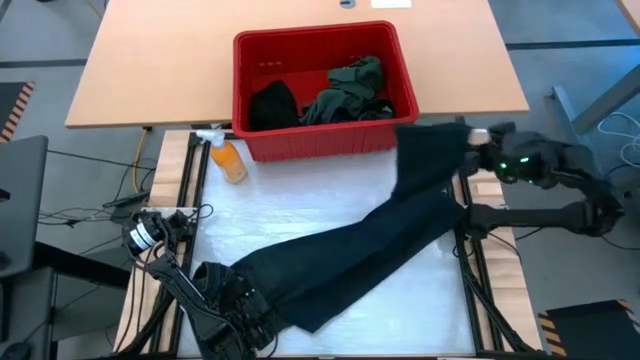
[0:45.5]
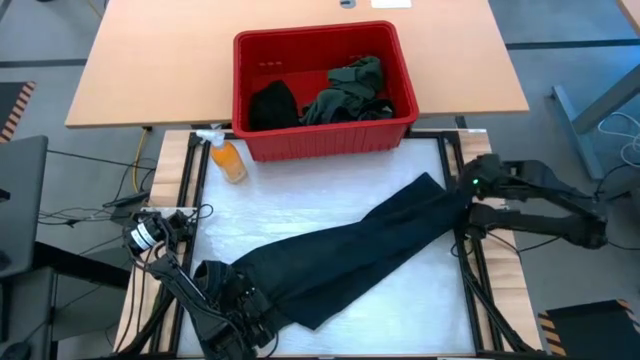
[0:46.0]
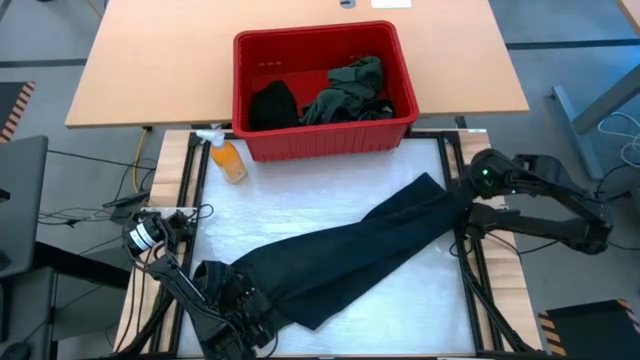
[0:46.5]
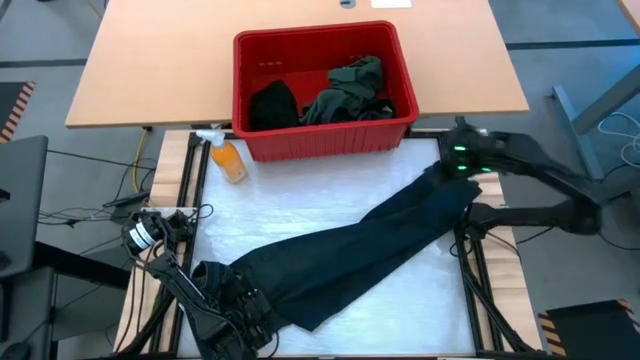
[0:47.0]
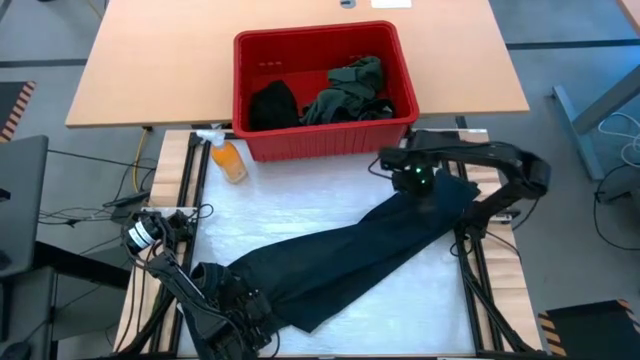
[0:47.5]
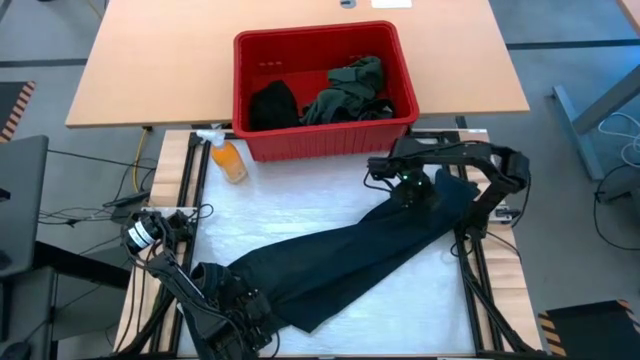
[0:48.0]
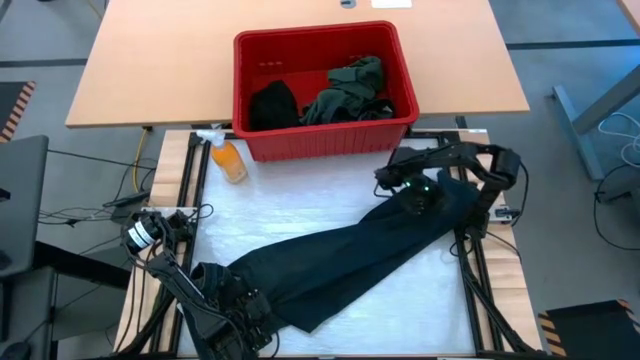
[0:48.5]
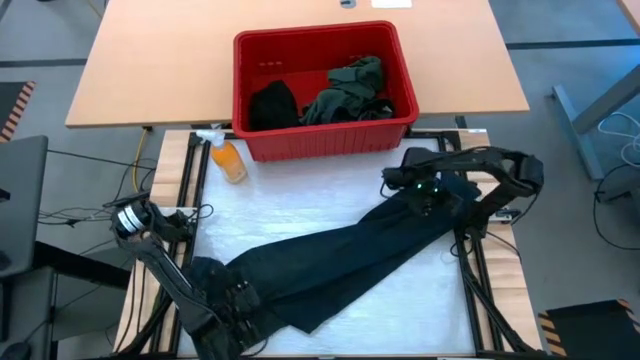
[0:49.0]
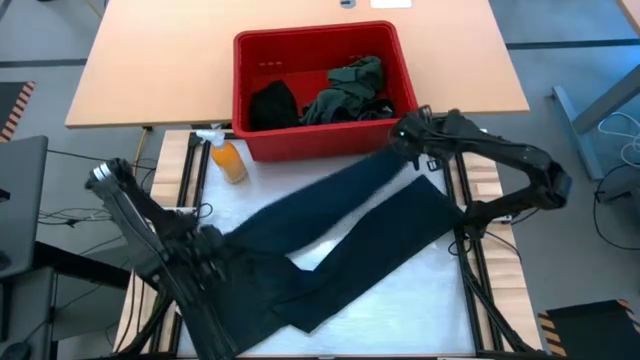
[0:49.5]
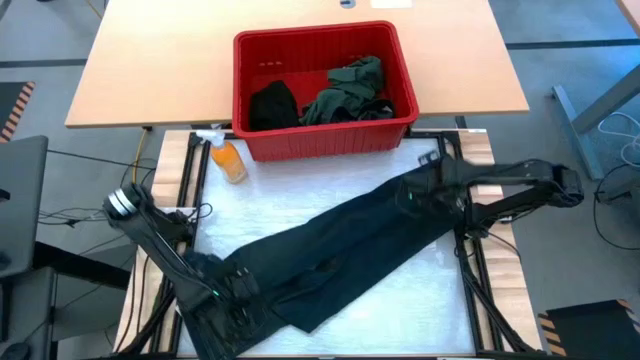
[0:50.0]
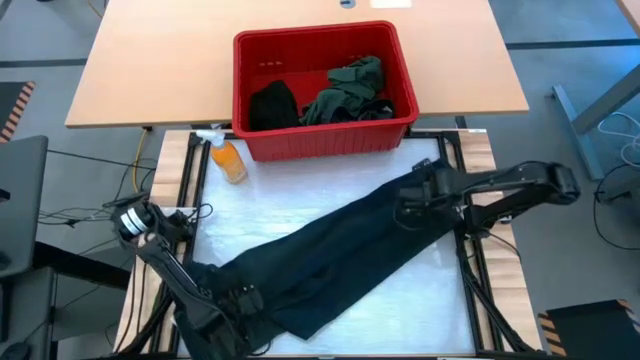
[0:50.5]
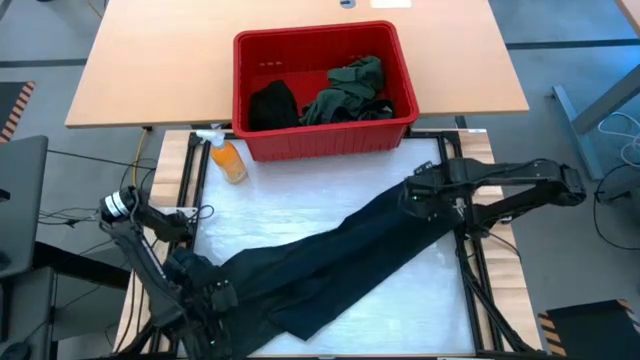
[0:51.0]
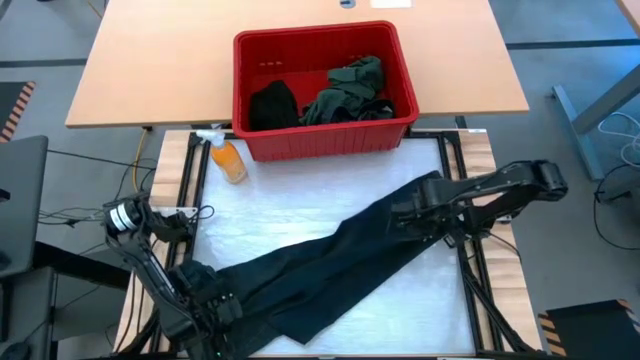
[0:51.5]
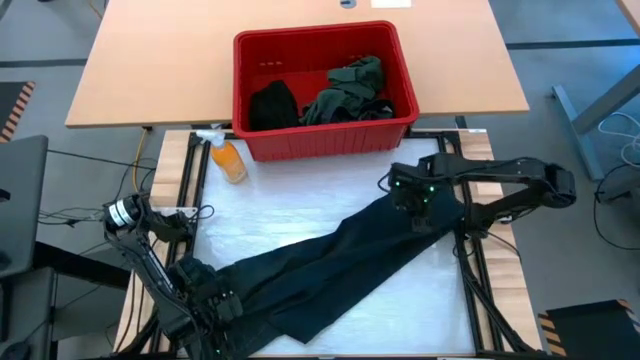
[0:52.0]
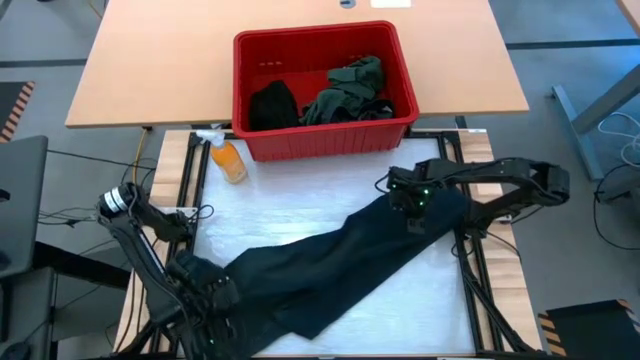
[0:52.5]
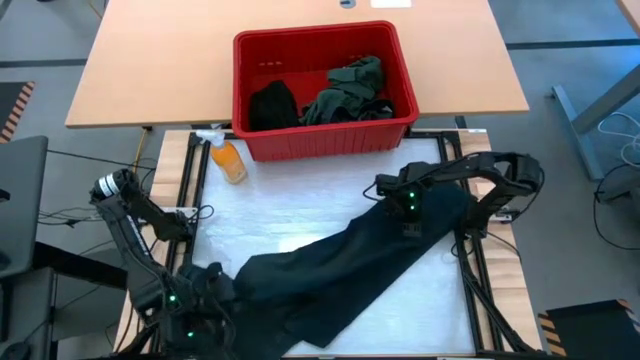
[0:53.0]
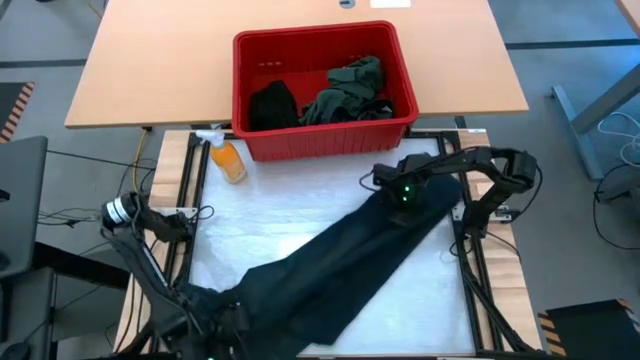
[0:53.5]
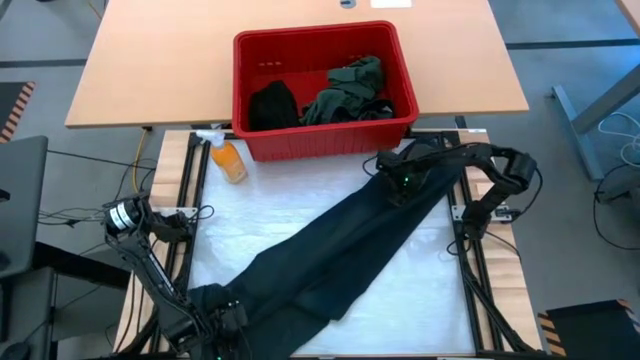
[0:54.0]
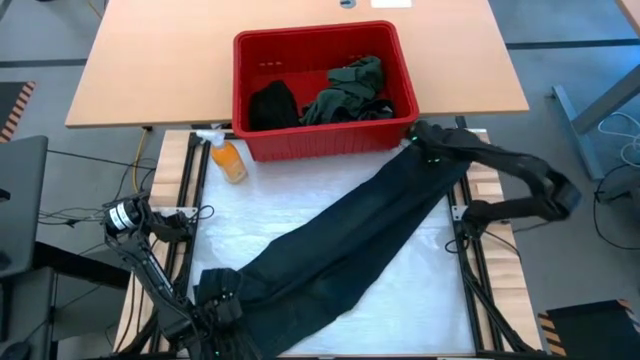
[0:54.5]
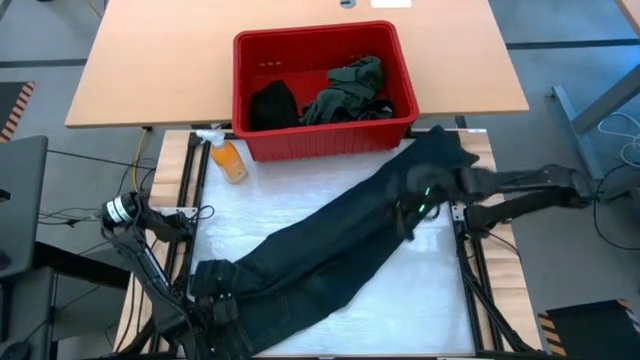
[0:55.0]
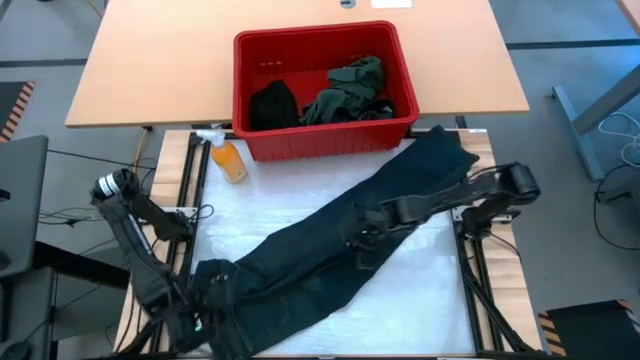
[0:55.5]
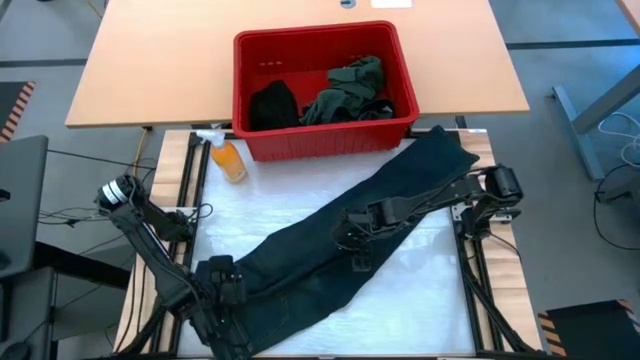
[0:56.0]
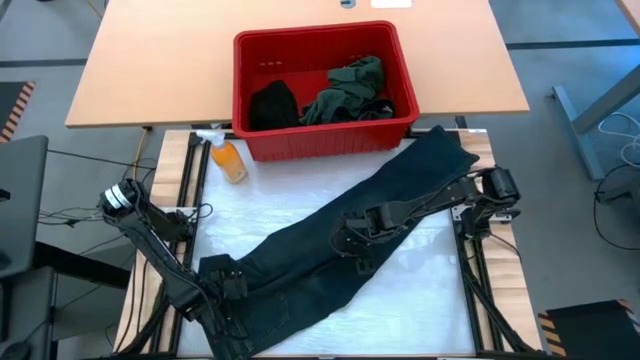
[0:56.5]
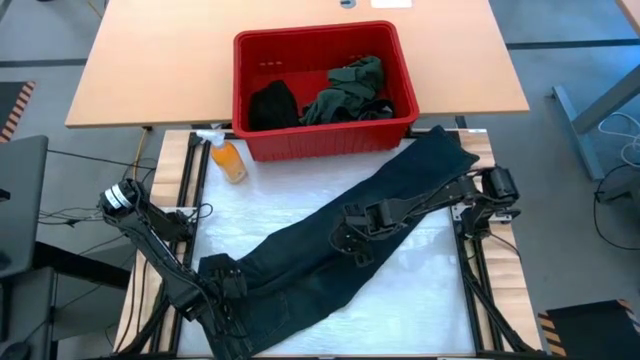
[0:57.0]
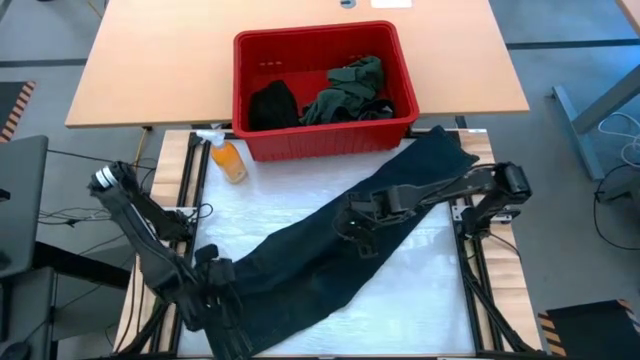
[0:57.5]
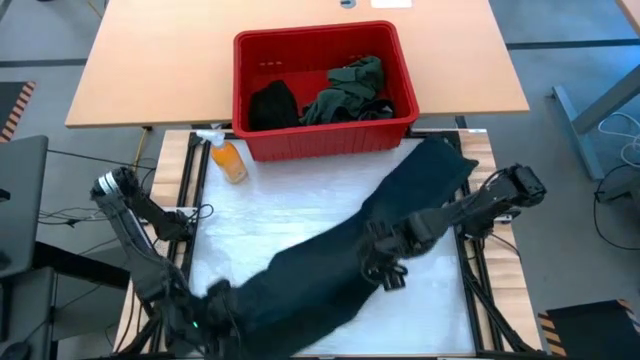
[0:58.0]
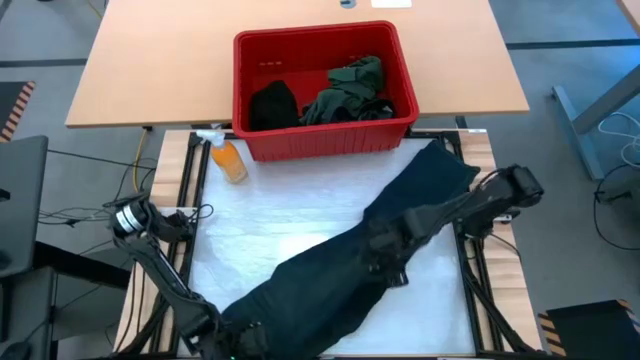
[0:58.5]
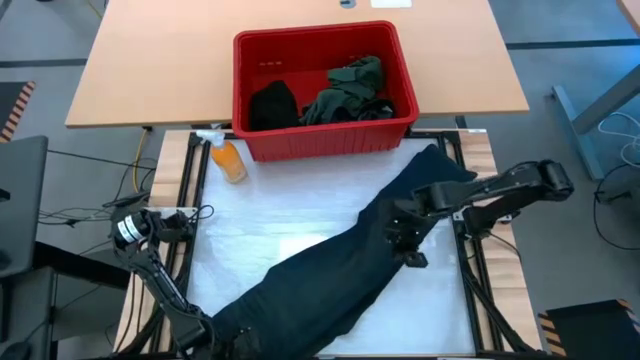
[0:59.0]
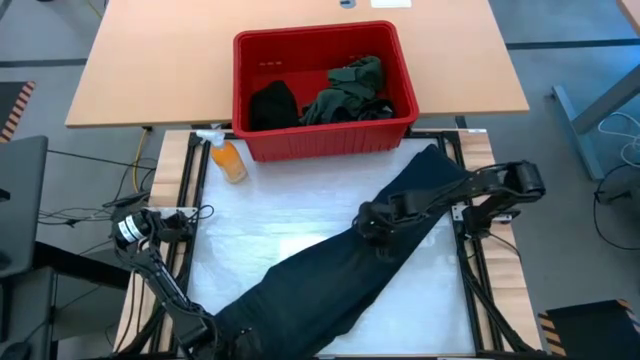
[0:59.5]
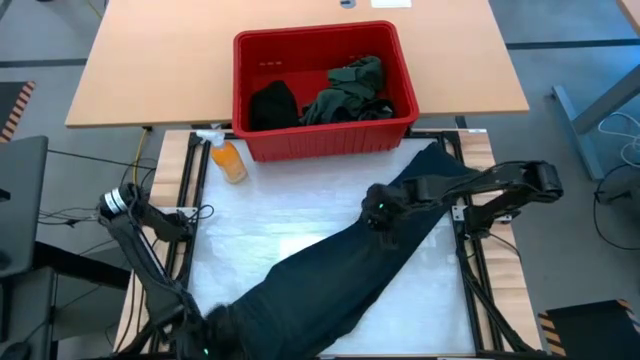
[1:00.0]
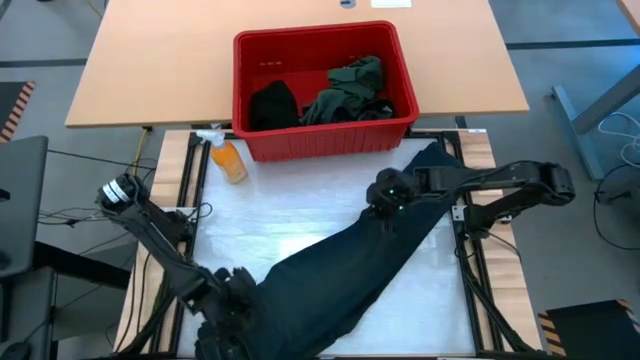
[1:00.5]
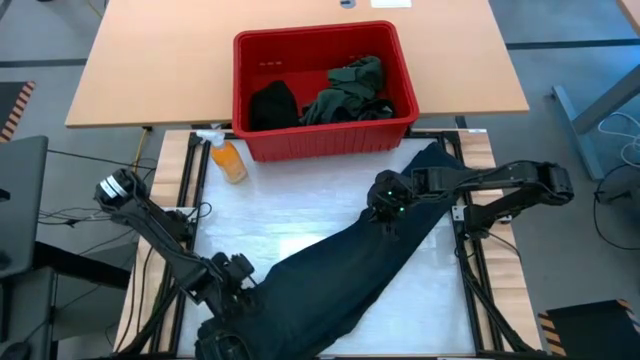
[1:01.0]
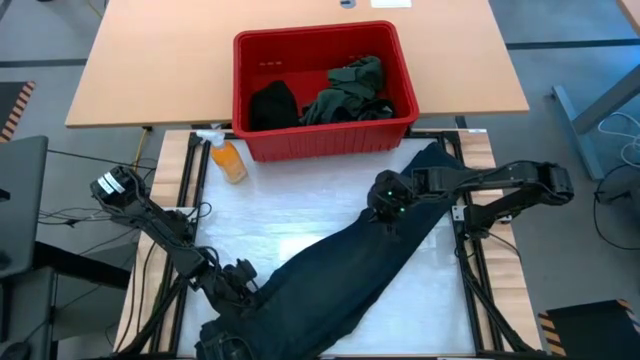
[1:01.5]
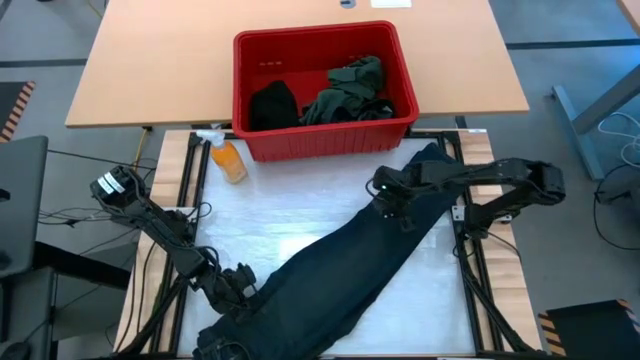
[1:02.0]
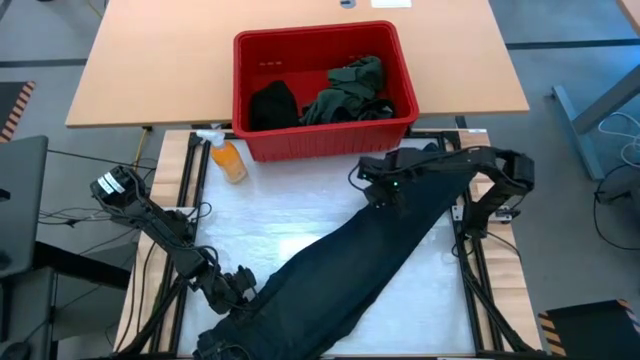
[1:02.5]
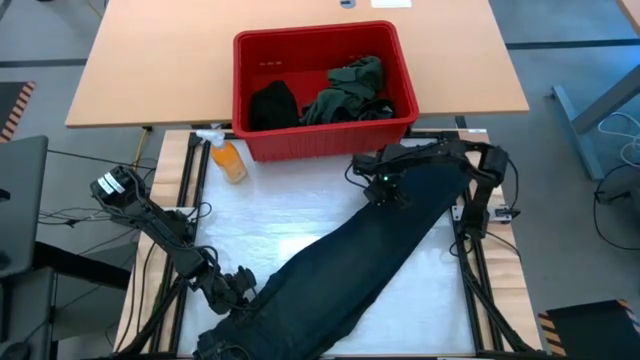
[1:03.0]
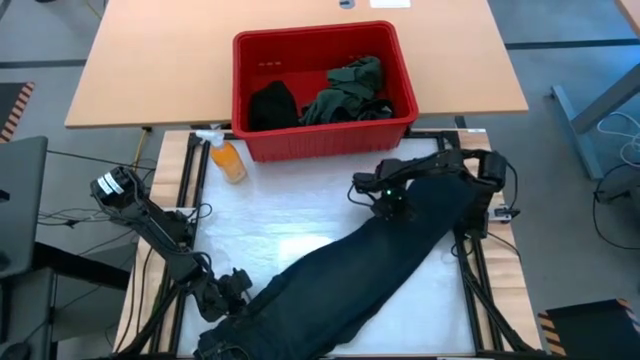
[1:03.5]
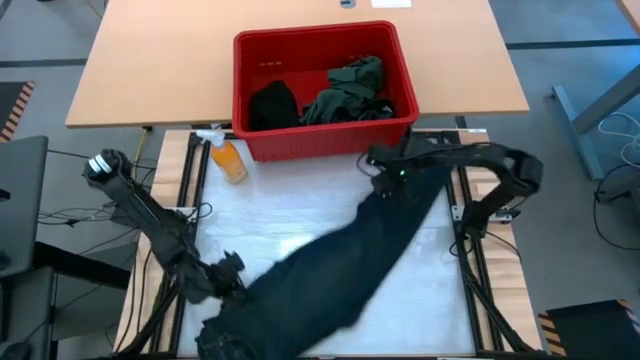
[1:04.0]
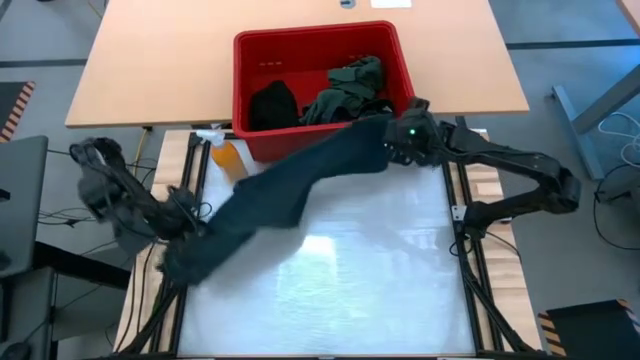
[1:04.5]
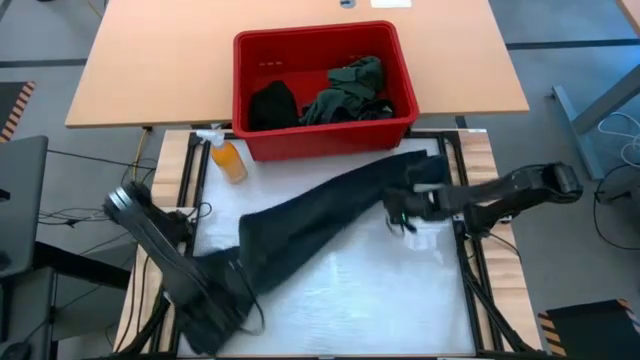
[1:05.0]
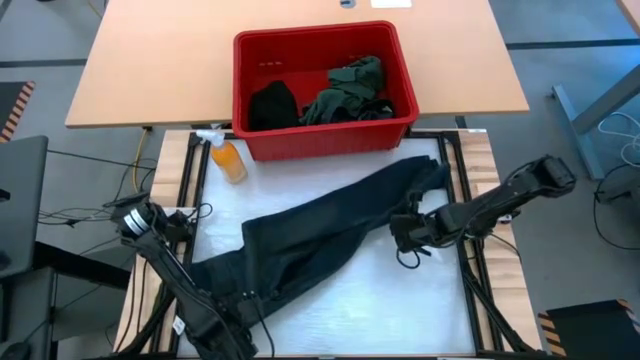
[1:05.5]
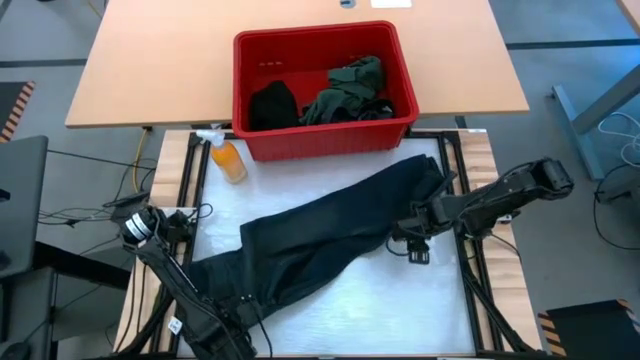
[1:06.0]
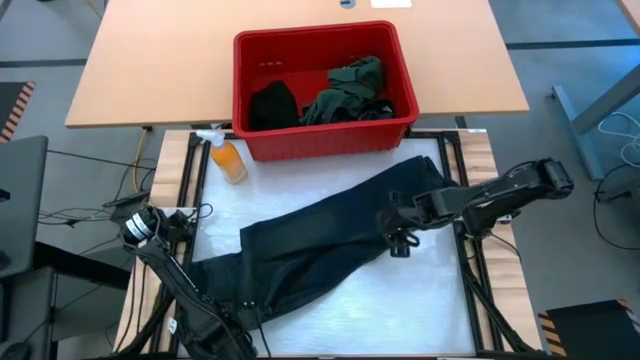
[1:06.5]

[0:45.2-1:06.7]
Task: Fold Laundry from Bin
Fold the dark blue pants

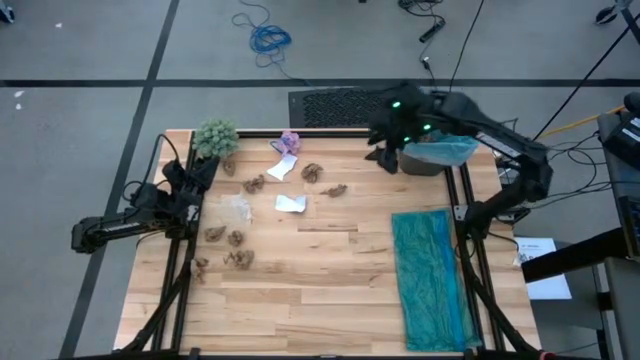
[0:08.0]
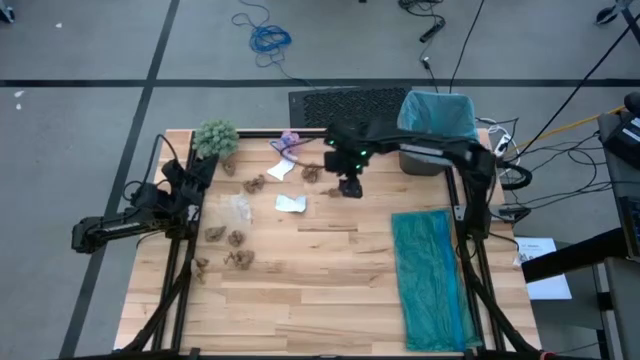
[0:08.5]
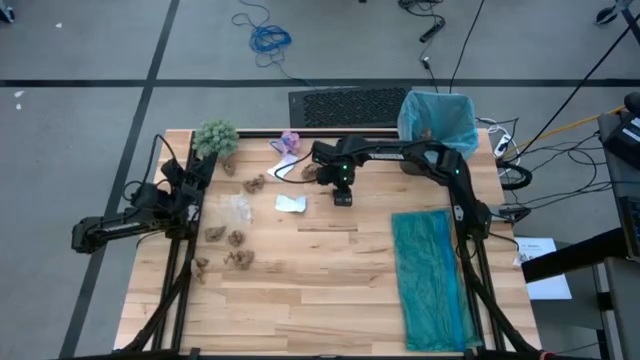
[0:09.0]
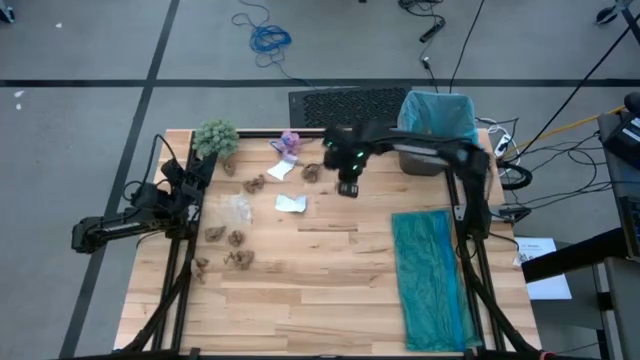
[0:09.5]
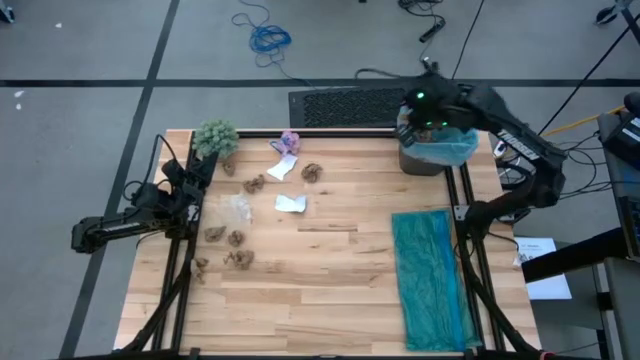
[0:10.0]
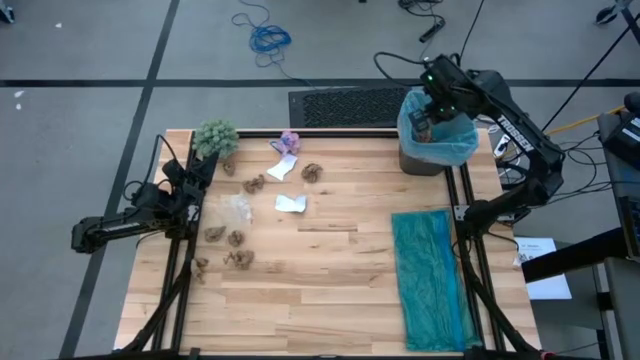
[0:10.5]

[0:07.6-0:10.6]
Task: place trash/remove bag and relplace
Put the brown paper into the trash bin
